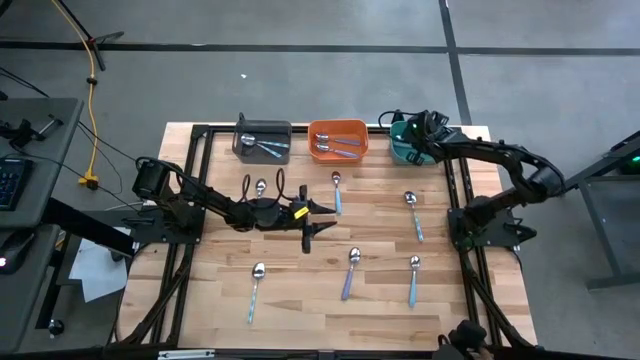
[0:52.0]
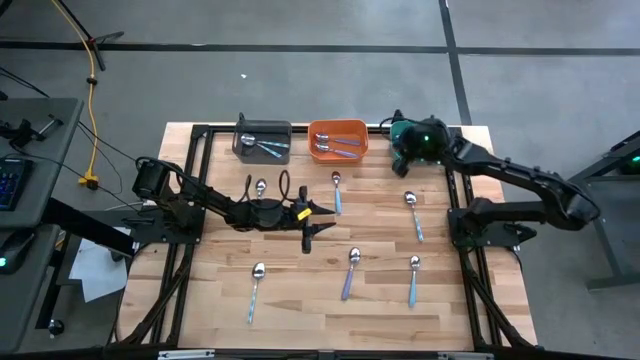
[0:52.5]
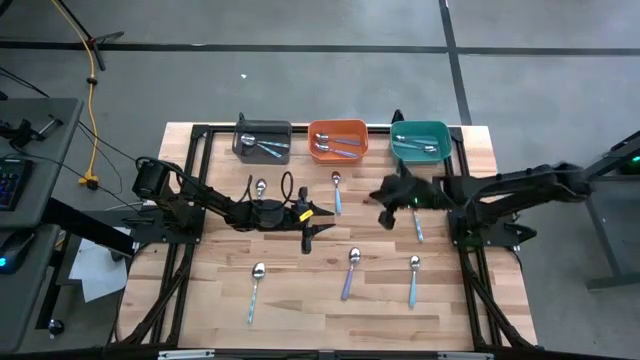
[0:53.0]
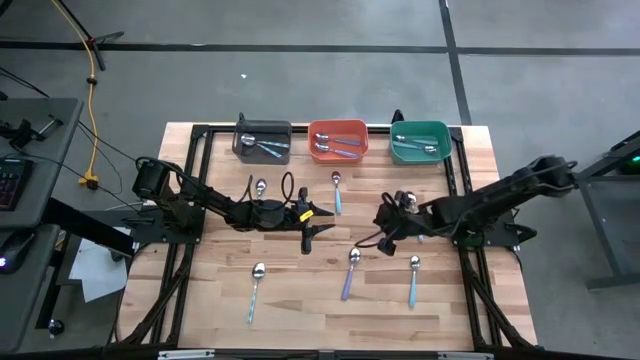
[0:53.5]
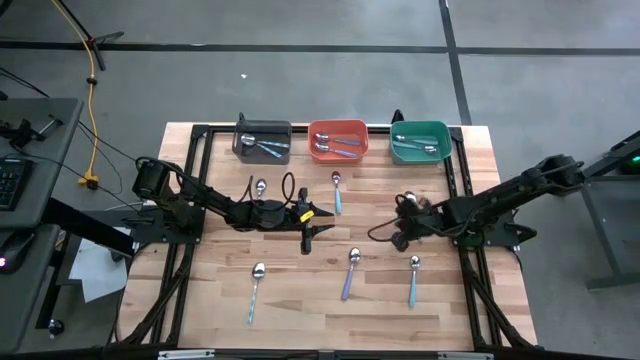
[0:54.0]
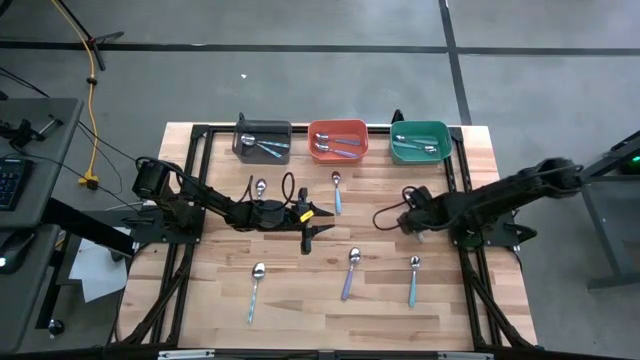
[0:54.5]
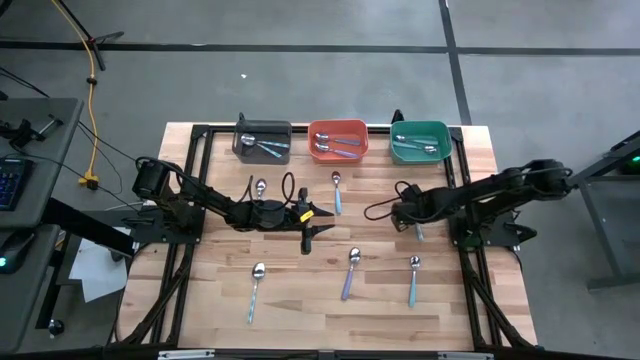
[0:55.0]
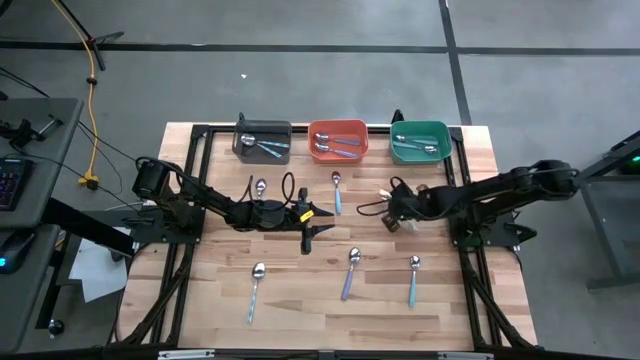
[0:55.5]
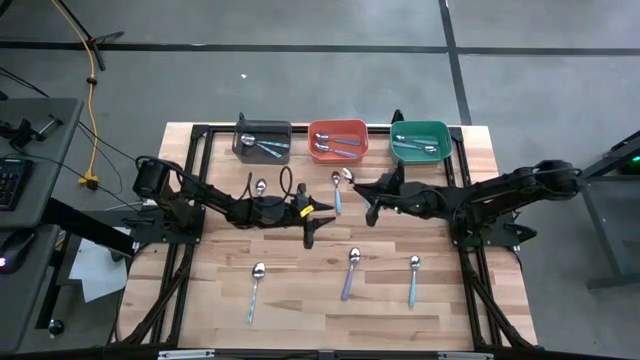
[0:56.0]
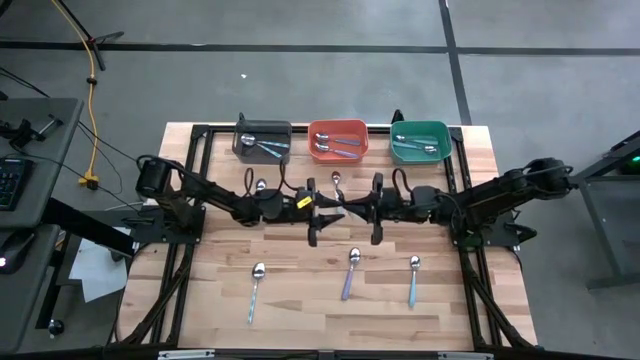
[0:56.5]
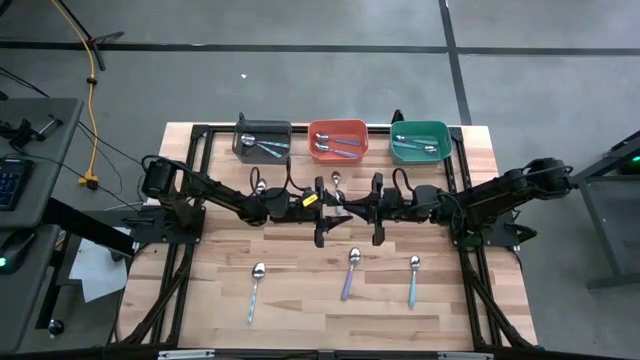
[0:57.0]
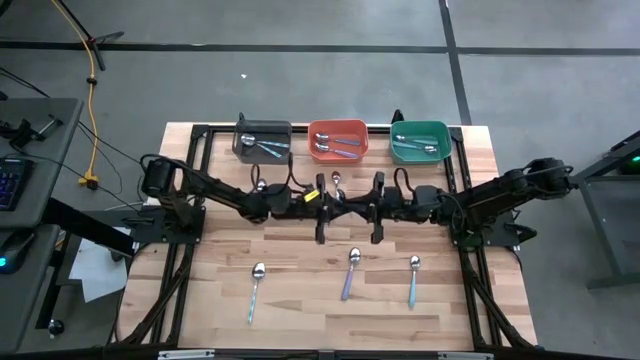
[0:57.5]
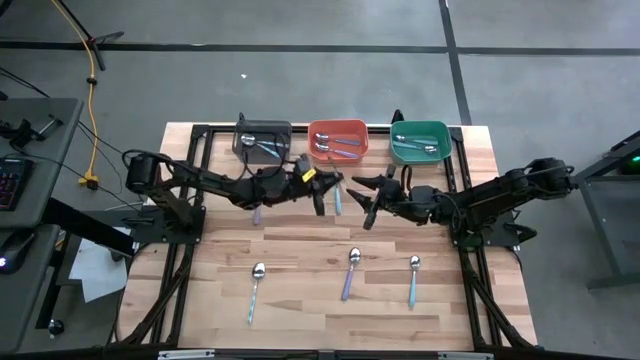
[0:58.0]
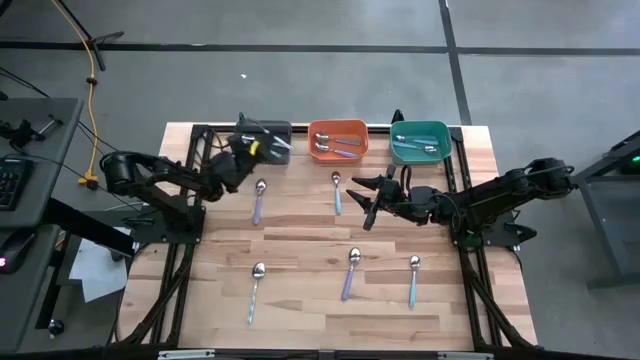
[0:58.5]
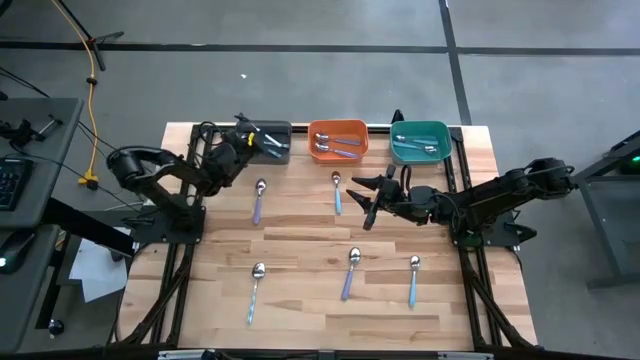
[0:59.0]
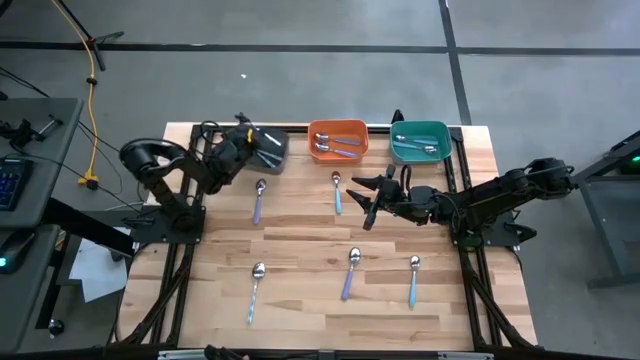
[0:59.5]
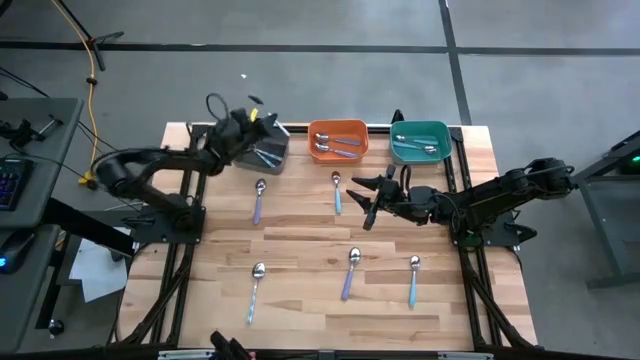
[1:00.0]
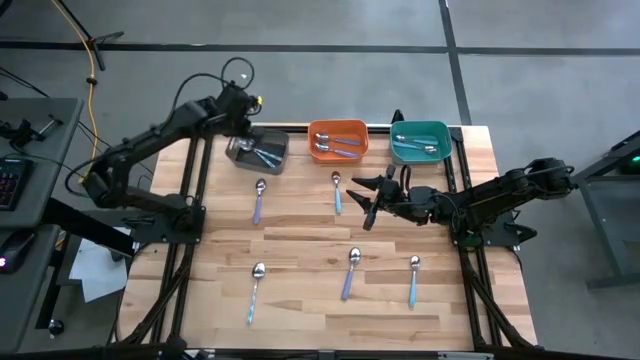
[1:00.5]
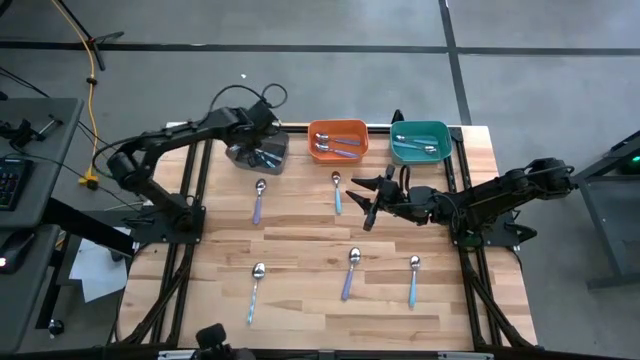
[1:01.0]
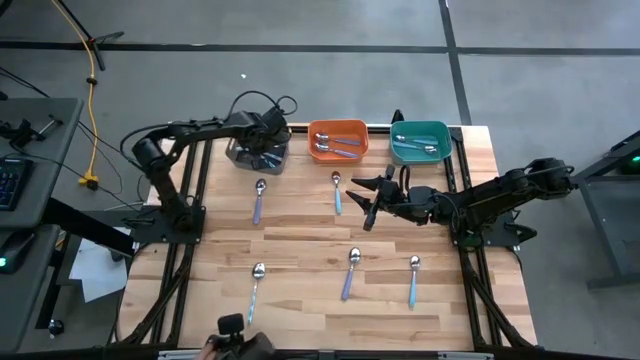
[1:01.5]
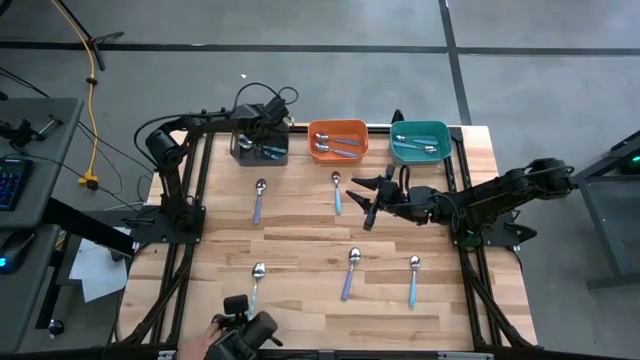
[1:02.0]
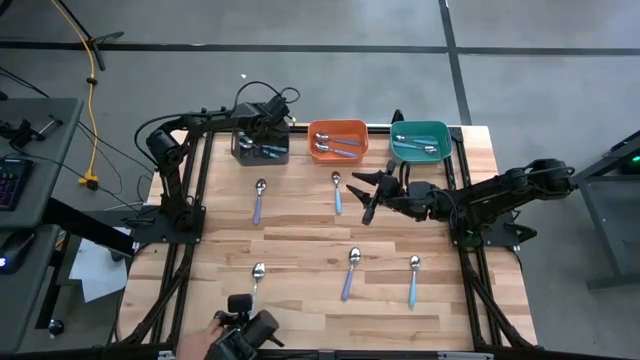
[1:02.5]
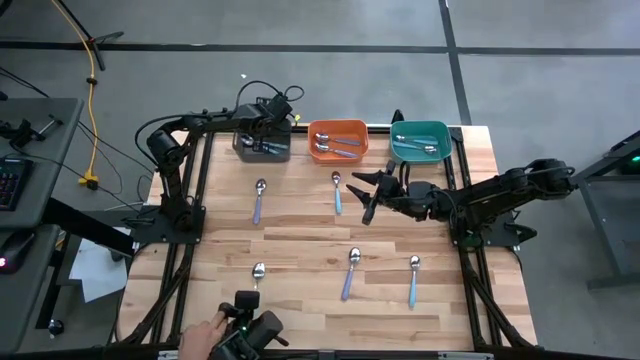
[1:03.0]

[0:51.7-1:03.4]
Task: Sort silverware by color (type)
Put the blue patterned spoon into the black bin

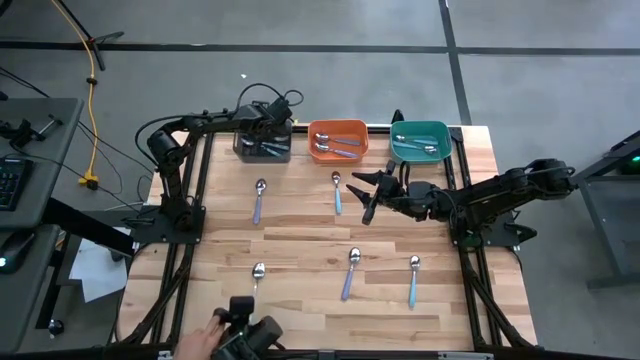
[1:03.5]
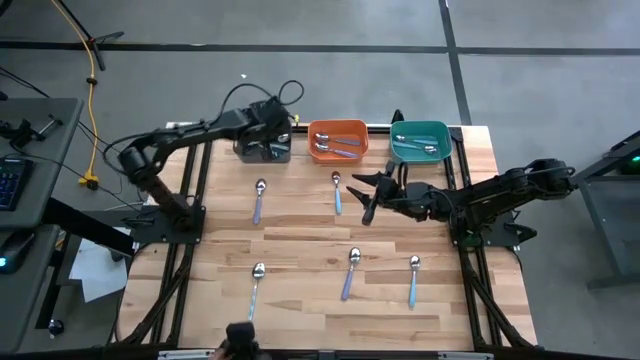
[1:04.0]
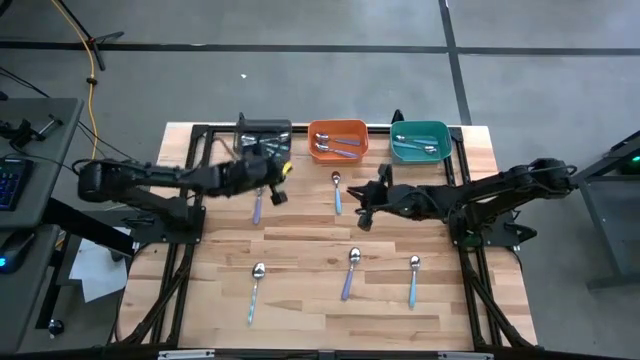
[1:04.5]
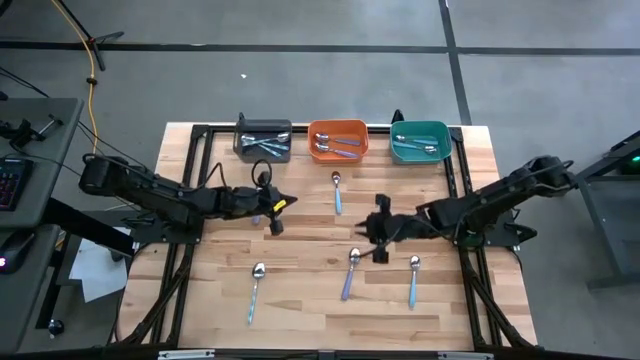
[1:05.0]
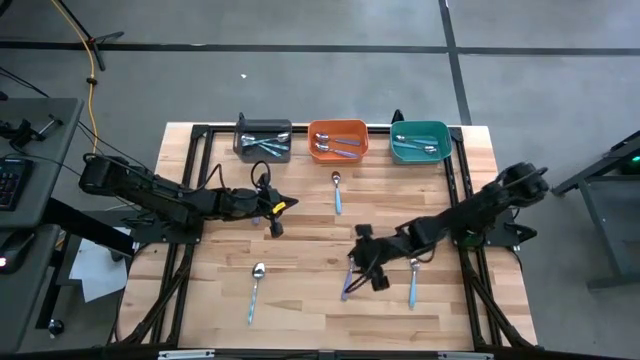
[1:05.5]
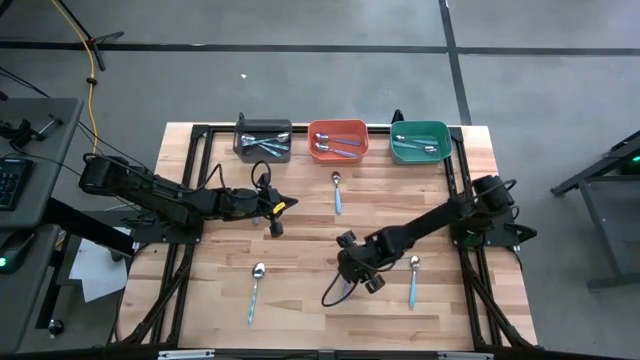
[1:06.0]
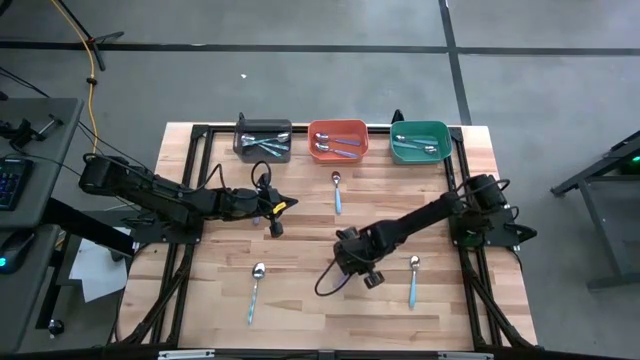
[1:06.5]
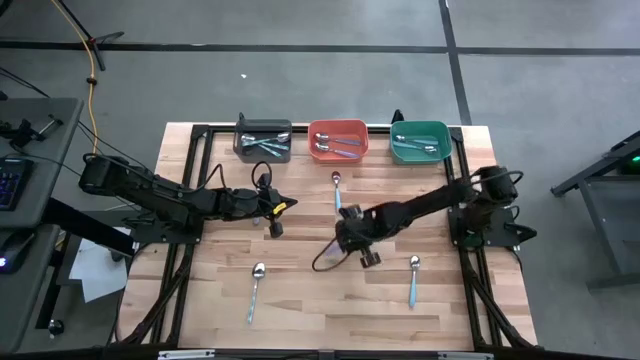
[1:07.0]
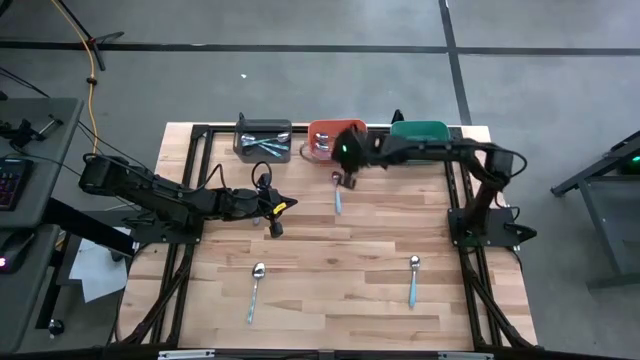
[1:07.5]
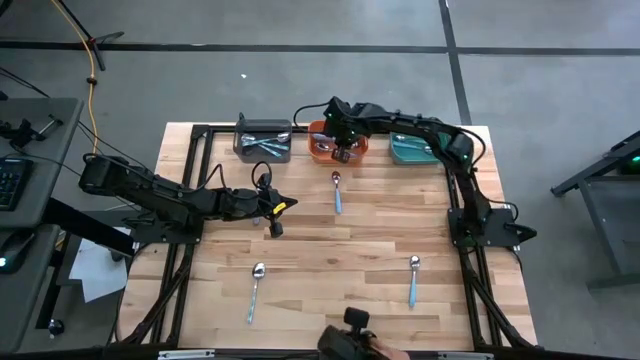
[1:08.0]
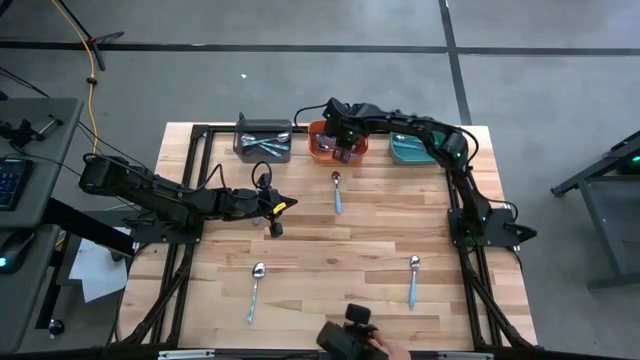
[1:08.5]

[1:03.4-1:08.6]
Put the purple spoon into the orange bin

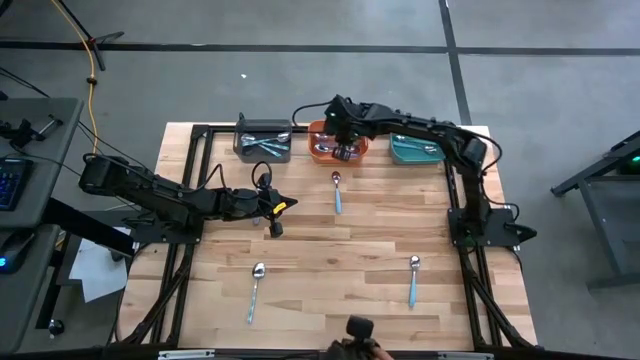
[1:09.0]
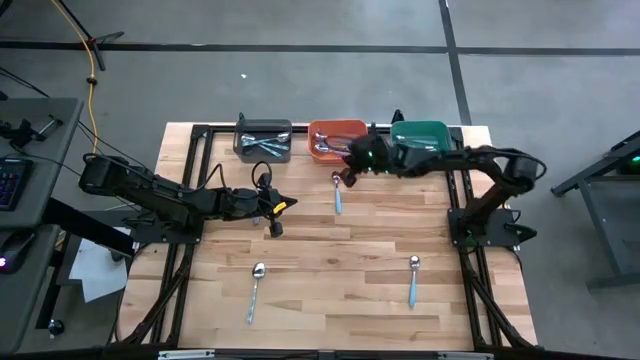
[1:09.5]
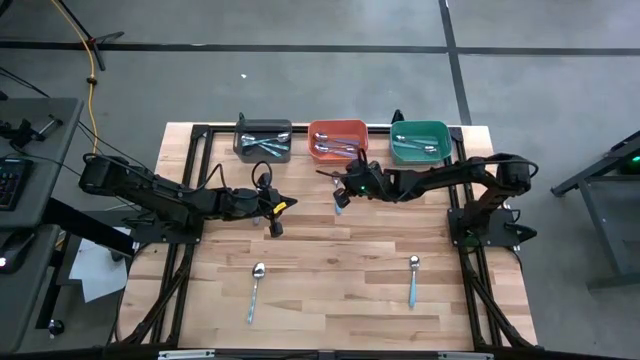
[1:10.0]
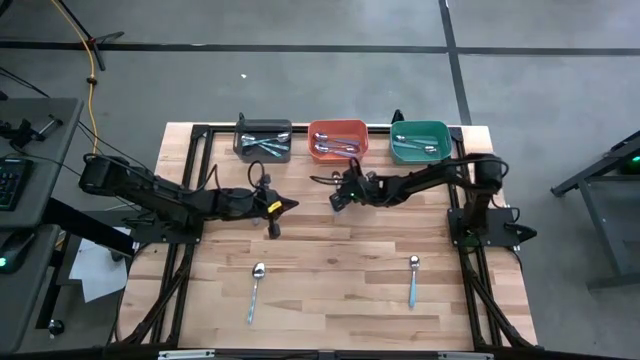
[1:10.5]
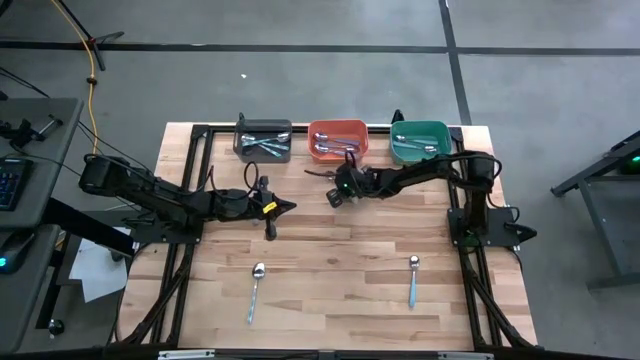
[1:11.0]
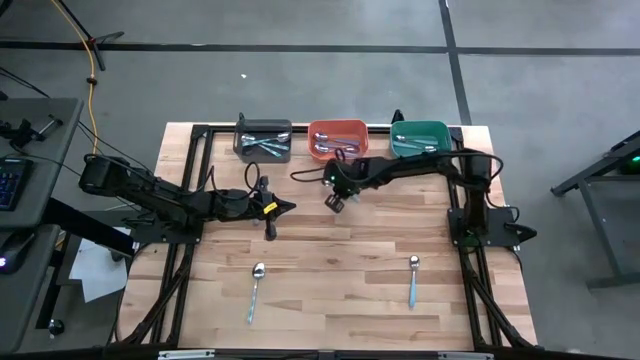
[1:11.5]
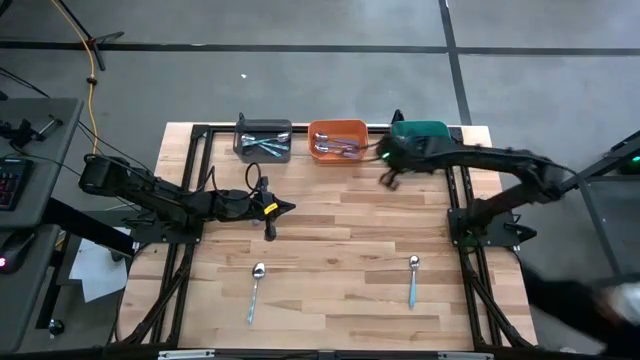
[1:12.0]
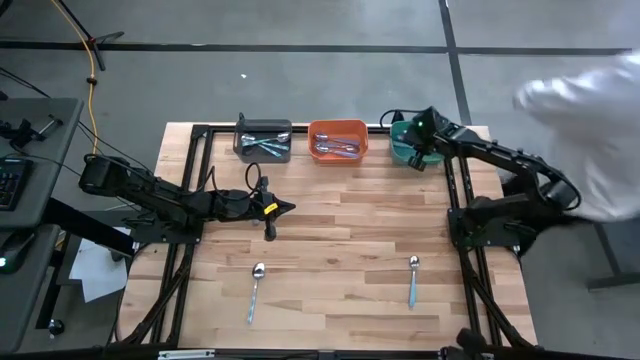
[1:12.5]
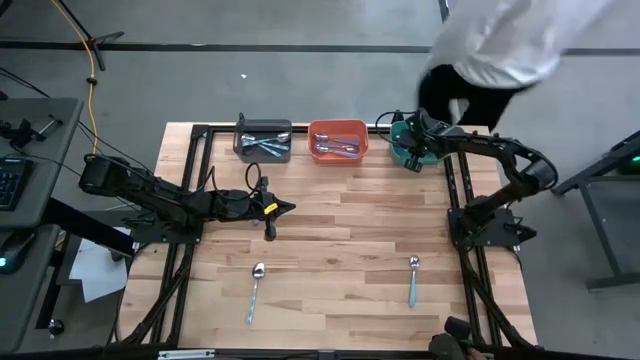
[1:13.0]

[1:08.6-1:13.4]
Put the blue spoon into the green bin
